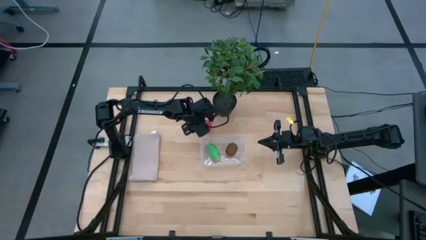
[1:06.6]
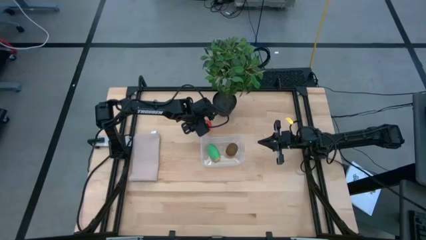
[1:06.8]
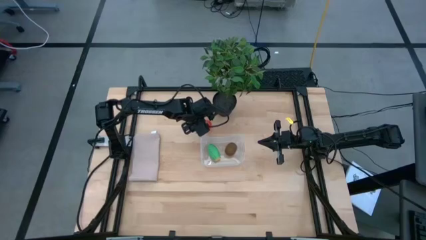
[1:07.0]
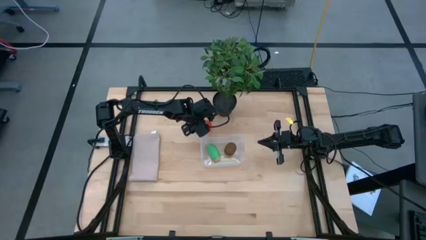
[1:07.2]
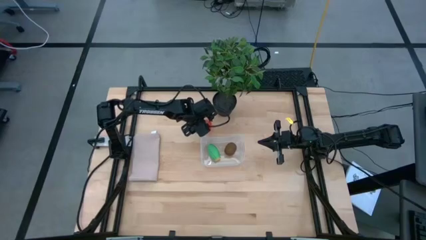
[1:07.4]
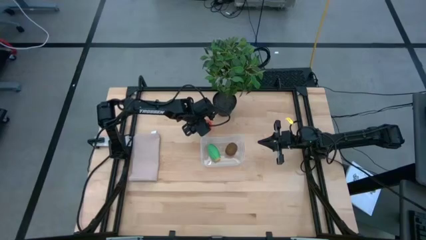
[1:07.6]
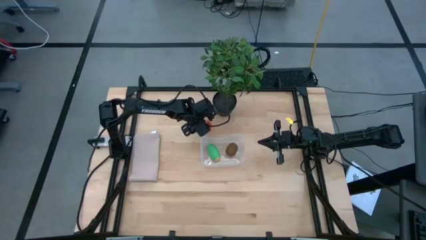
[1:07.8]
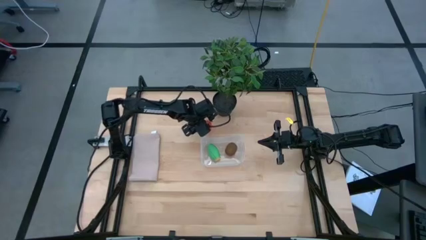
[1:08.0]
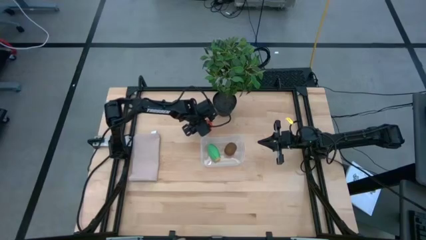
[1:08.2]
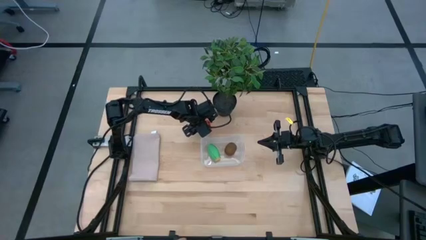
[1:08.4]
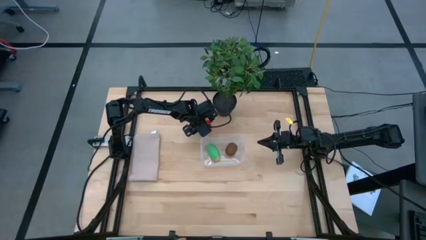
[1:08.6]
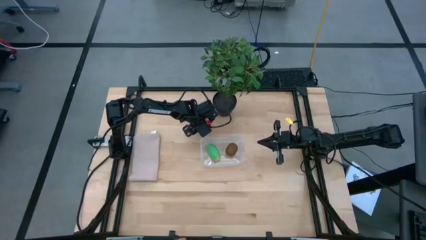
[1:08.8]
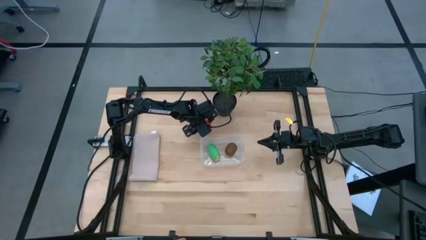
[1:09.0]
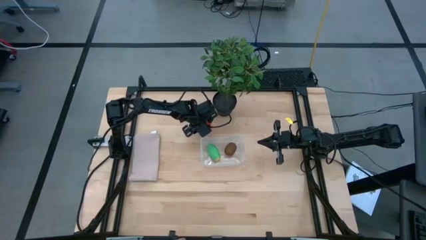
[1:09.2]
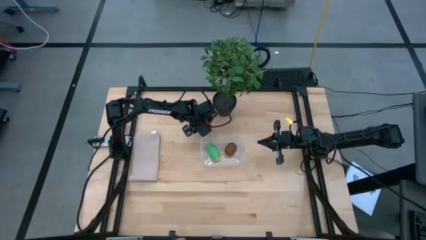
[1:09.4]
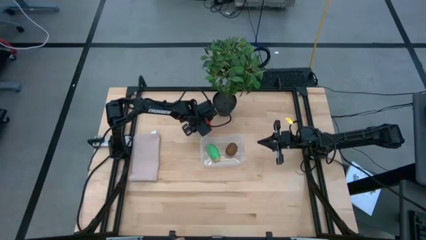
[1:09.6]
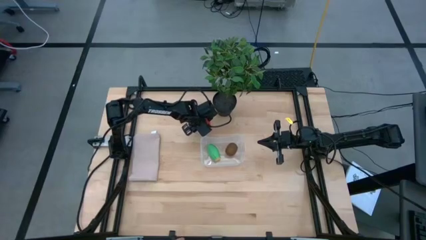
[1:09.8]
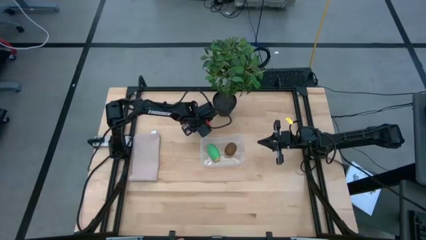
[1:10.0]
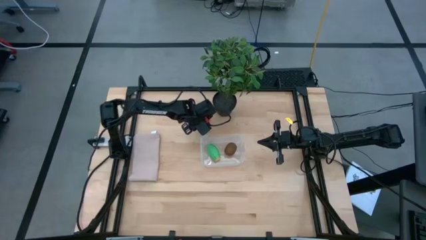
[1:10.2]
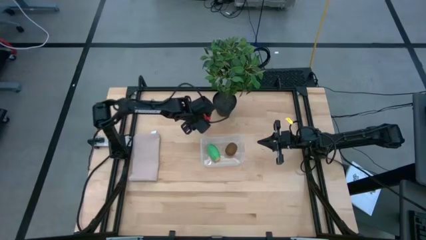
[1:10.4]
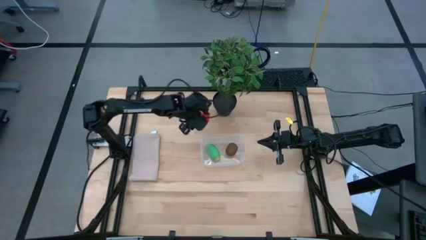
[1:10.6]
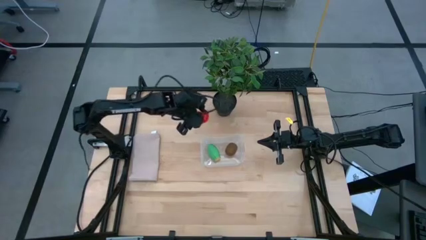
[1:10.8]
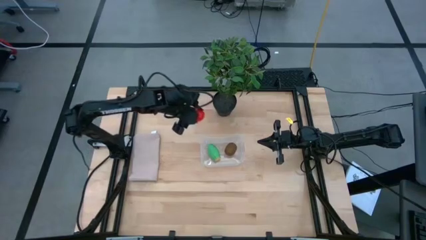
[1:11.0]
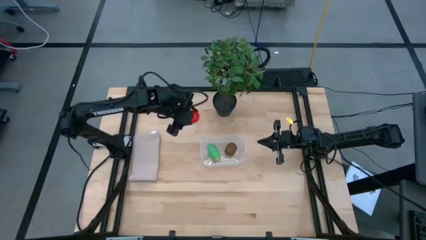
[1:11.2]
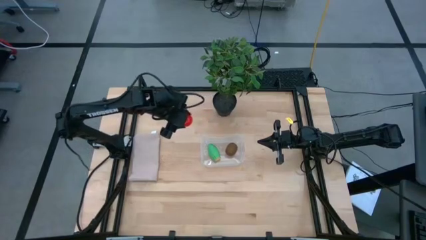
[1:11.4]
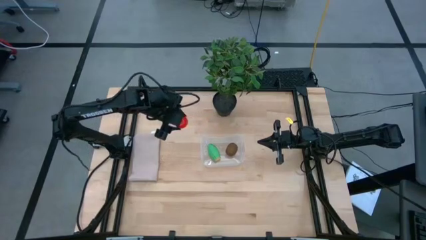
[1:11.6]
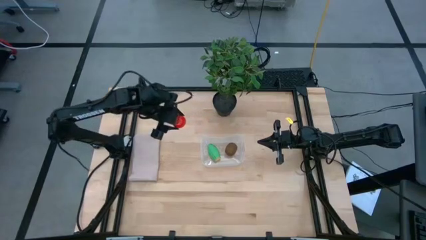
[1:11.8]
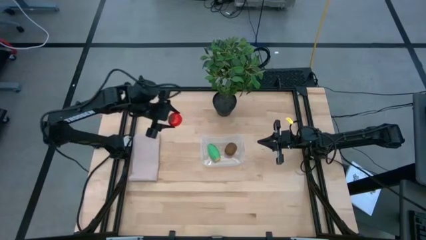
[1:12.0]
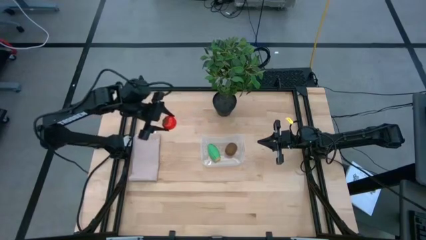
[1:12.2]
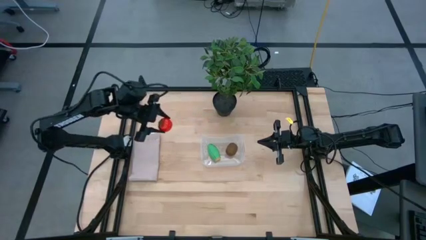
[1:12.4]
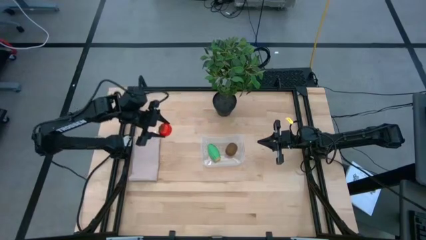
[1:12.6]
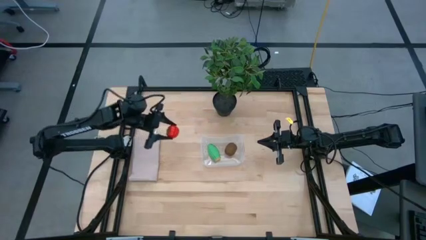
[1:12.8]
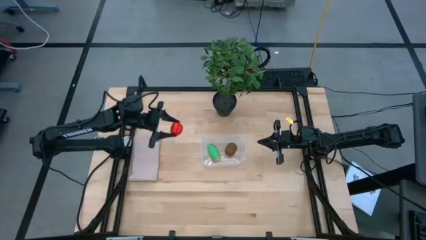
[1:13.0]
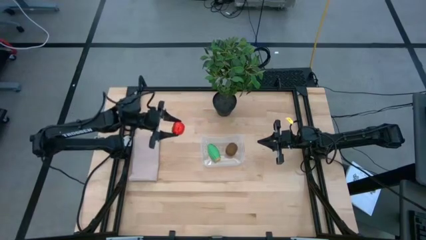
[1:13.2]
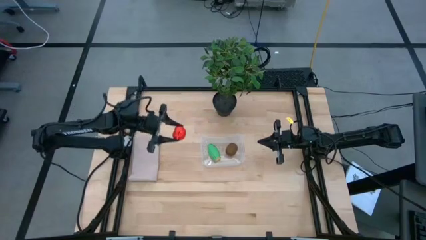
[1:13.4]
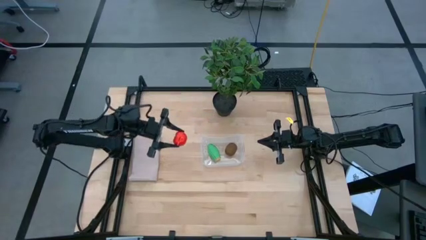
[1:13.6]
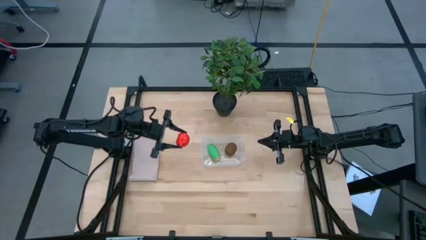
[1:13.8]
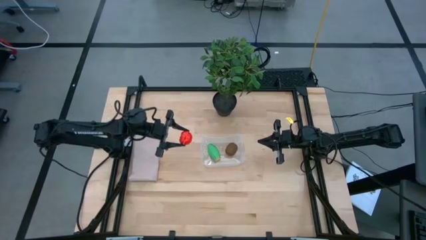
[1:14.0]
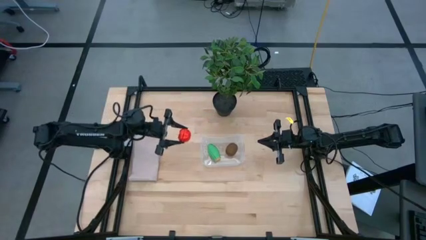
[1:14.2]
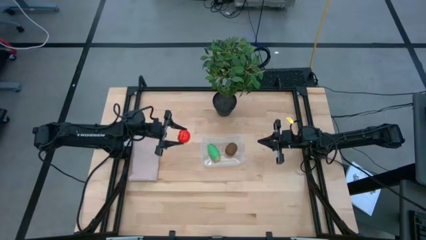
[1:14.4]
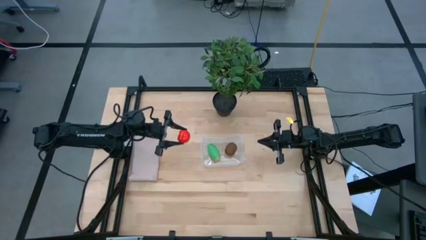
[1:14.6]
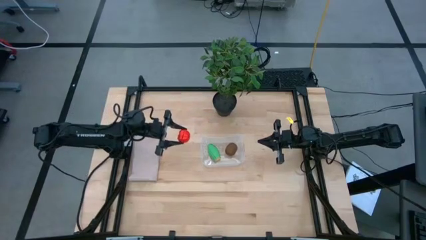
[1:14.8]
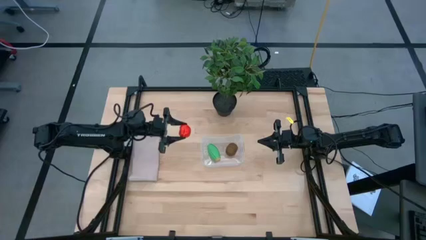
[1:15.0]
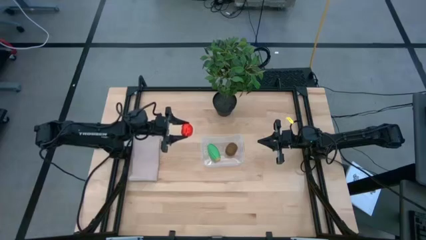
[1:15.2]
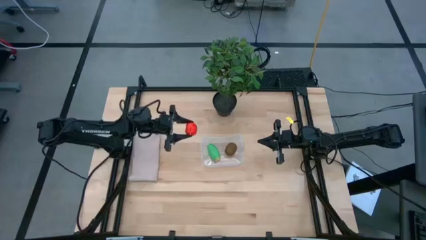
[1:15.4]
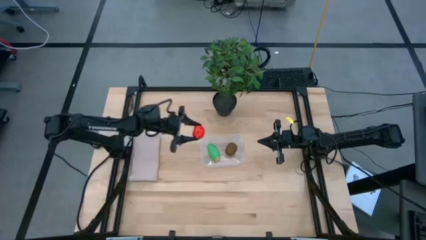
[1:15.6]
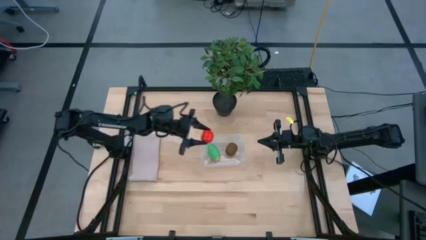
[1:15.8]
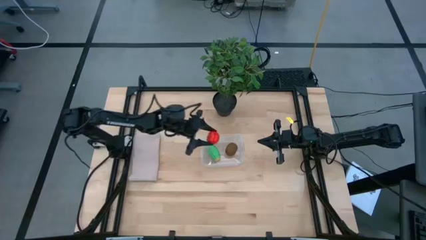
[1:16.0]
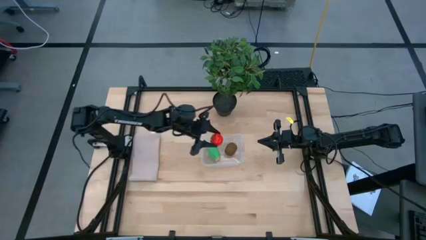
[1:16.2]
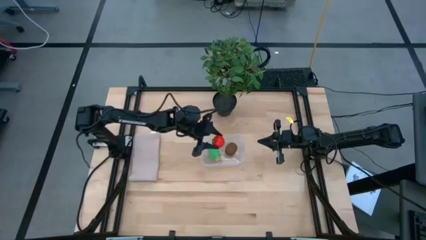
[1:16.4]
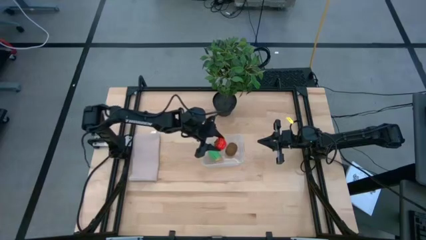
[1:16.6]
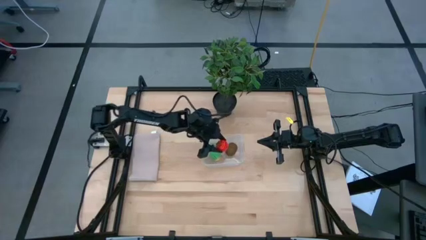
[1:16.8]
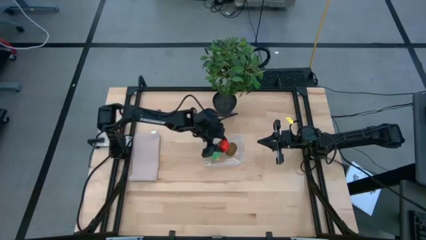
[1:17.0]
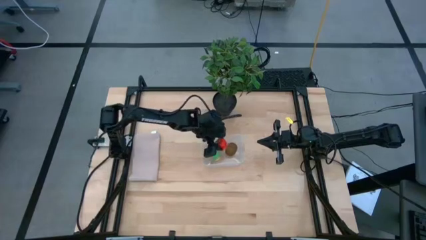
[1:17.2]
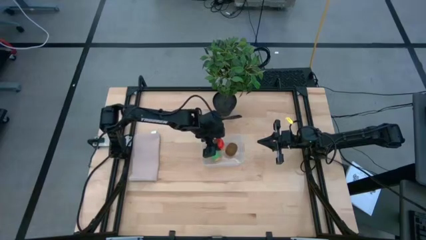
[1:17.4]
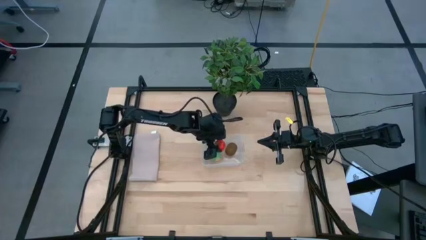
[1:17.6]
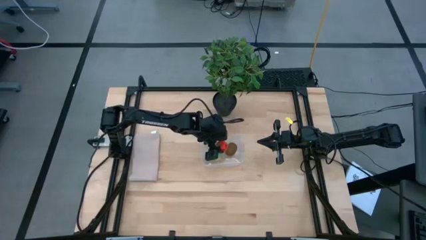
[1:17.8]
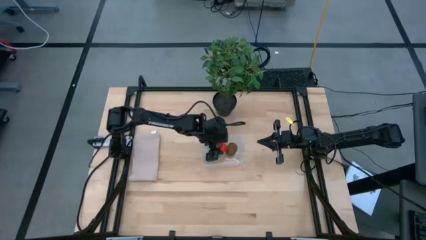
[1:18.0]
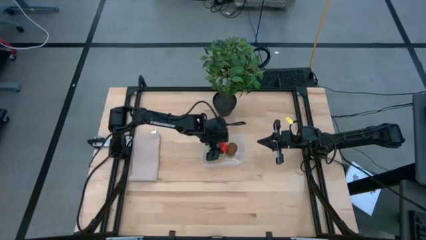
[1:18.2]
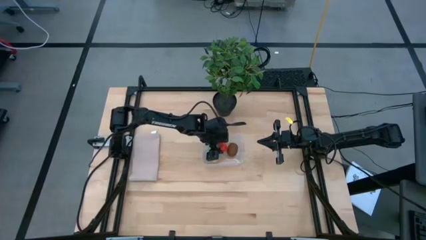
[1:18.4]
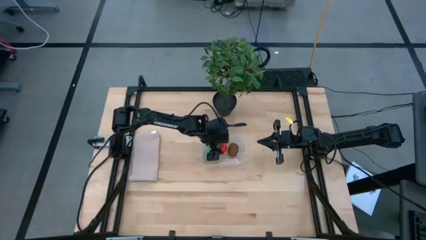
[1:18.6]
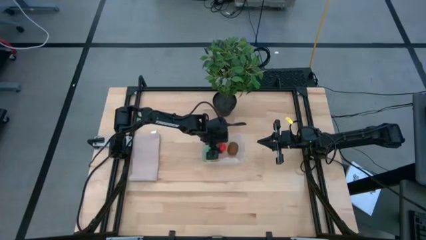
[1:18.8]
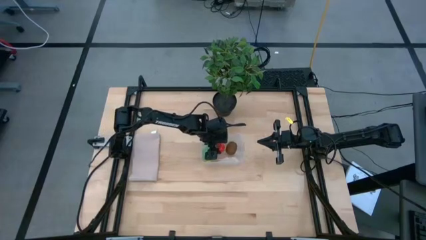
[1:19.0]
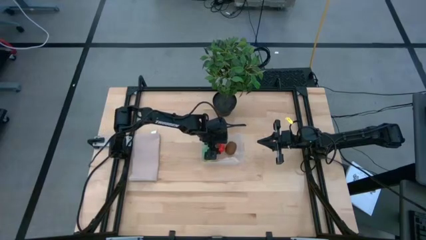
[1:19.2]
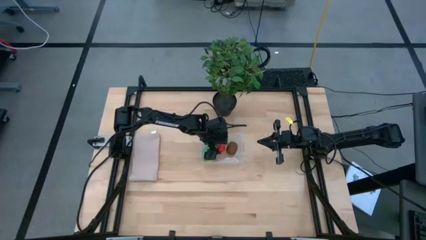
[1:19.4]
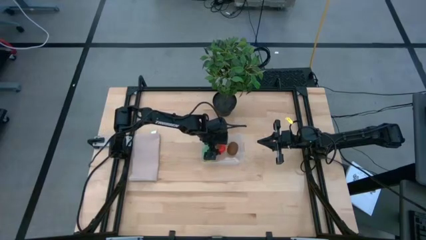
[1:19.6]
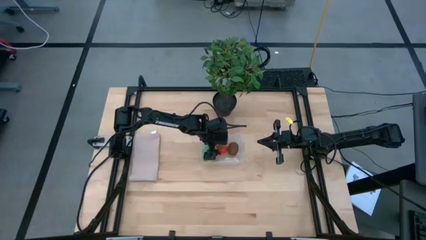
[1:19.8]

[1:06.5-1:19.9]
Task: Pick and placing Produce into tupperware
Put the red tomato into the transparent bin

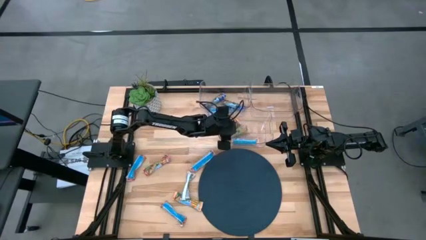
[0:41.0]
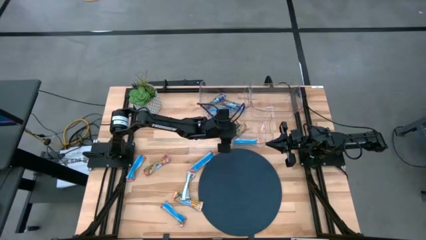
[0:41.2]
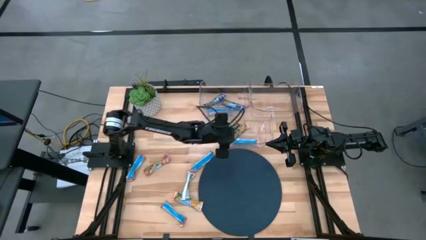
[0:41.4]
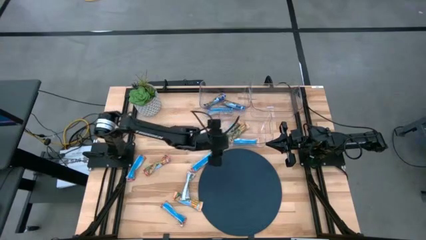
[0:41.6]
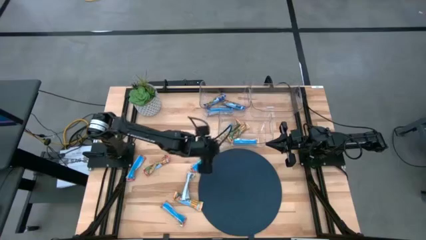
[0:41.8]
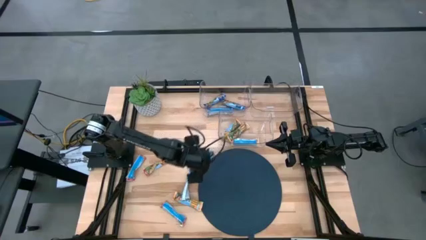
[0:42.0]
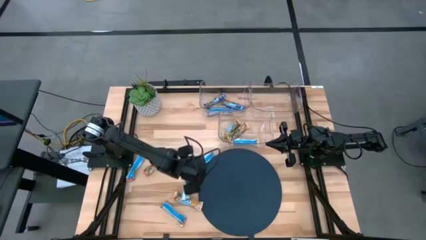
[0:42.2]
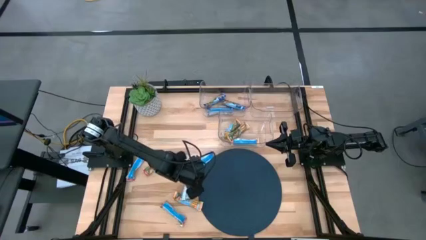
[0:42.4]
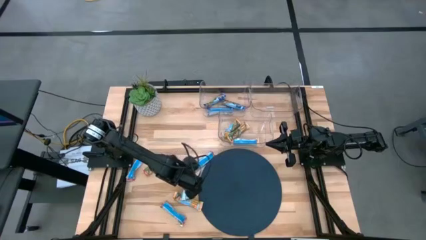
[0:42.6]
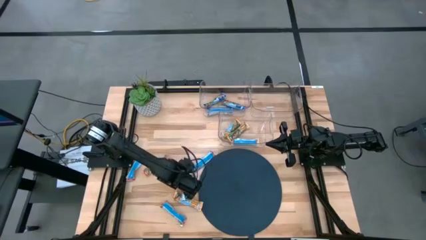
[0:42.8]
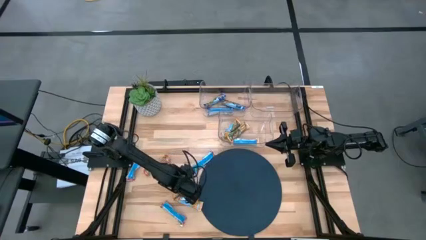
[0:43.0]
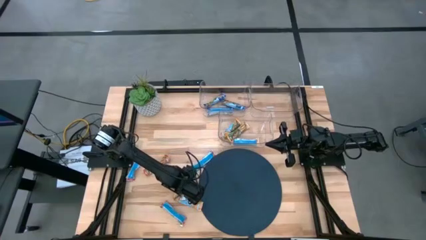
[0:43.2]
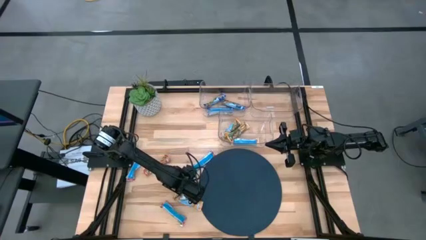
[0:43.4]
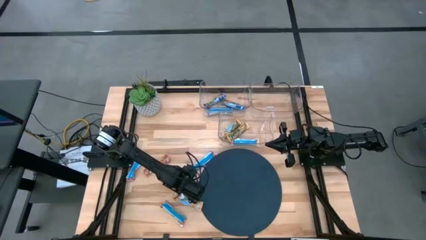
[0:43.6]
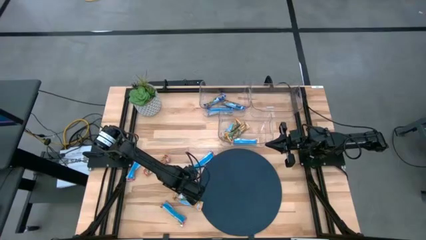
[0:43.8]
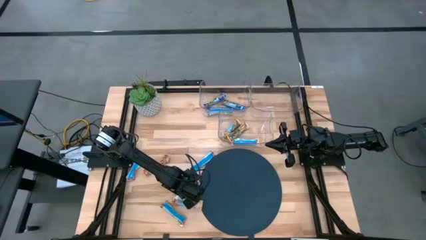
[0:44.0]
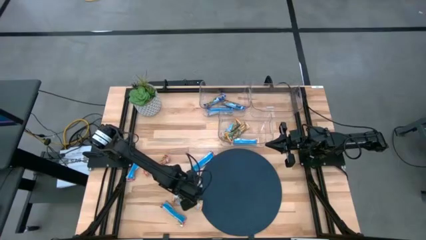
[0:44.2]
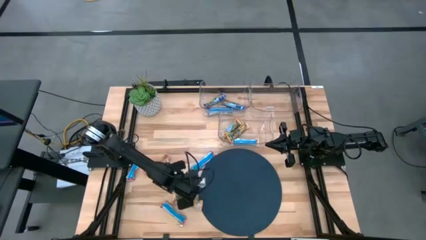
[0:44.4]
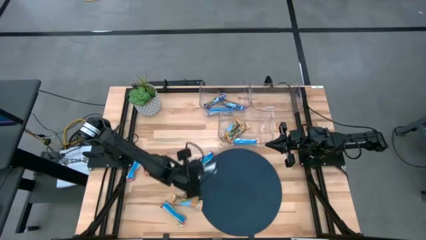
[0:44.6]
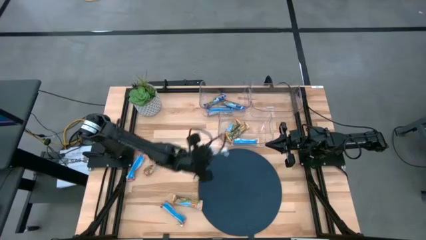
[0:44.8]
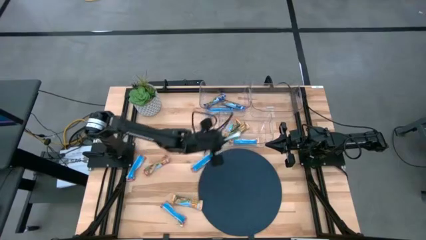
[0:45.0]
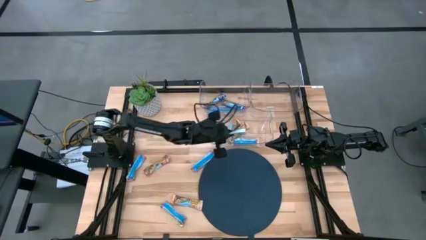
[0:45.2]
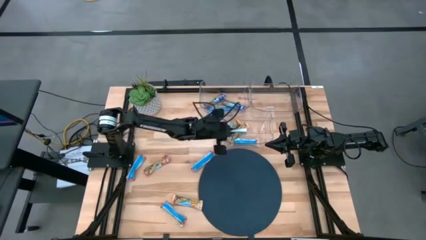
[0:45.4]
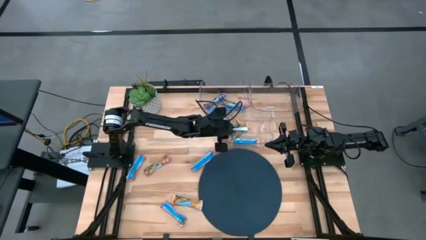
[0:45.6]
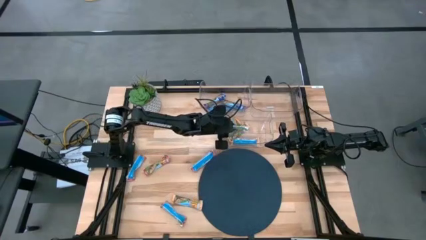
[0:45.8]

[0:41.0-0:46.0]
Task: Pick and place Granola Bars by type
Put the yellow granola bar into the bottom transparent bin
